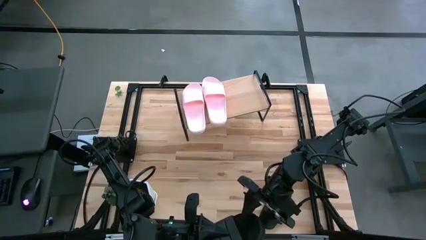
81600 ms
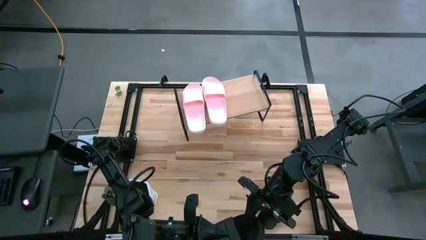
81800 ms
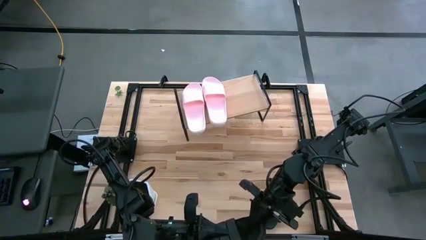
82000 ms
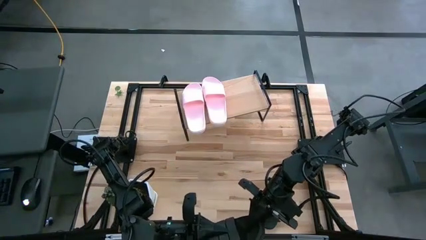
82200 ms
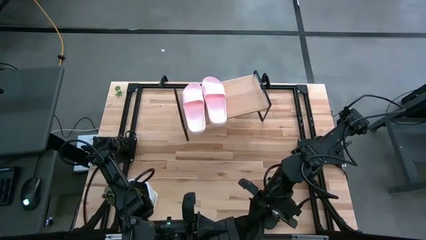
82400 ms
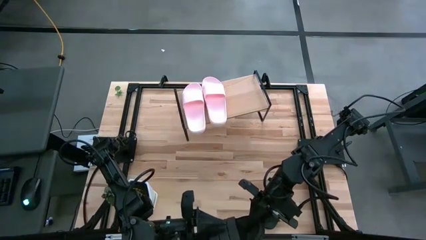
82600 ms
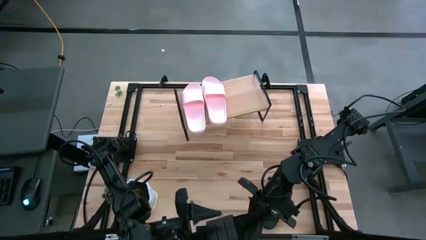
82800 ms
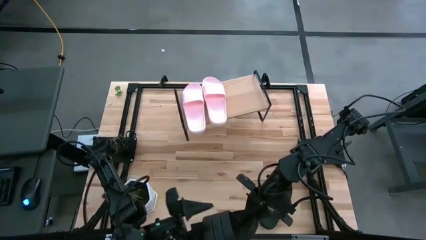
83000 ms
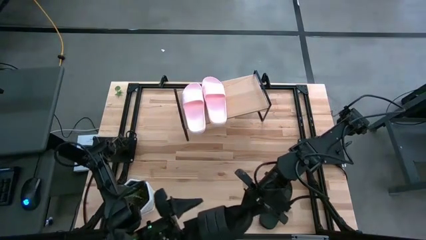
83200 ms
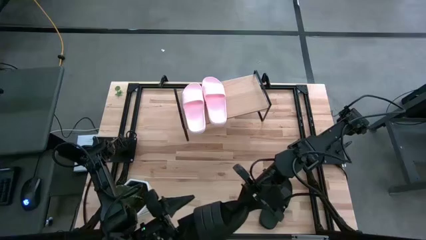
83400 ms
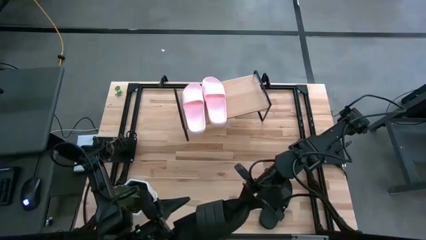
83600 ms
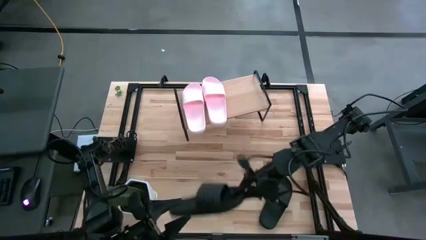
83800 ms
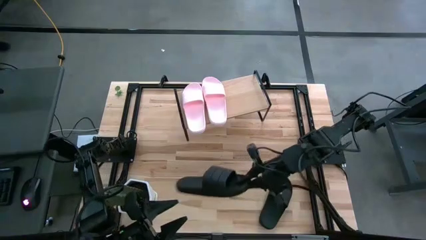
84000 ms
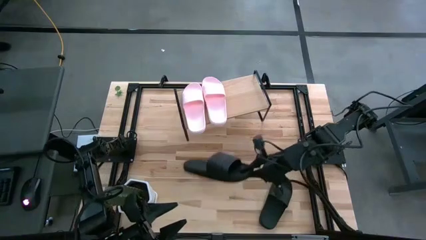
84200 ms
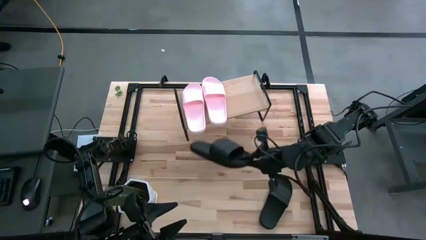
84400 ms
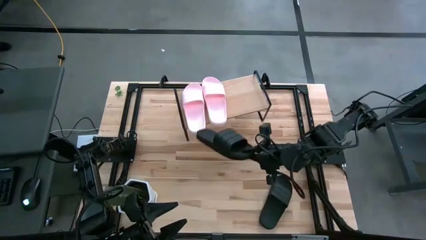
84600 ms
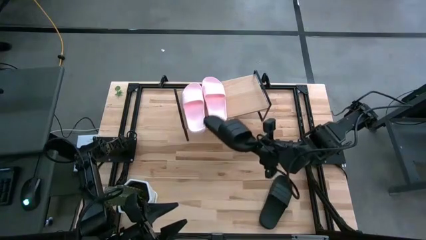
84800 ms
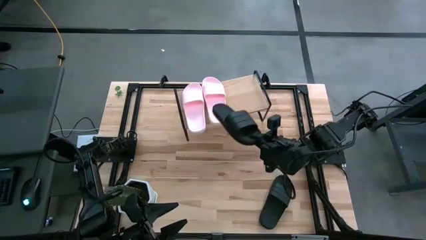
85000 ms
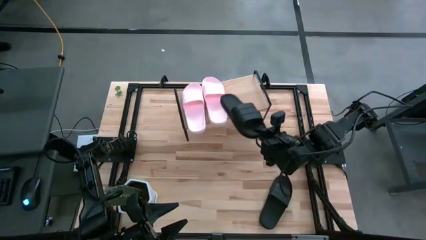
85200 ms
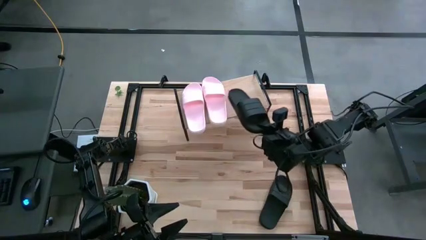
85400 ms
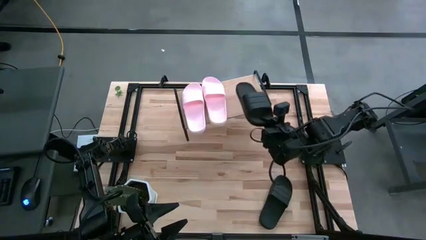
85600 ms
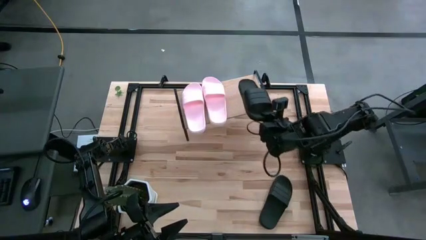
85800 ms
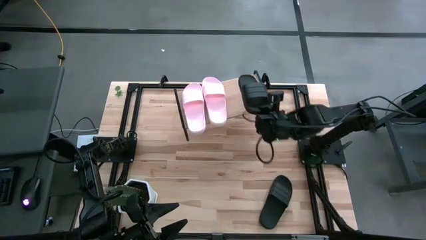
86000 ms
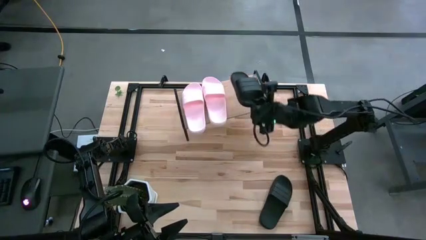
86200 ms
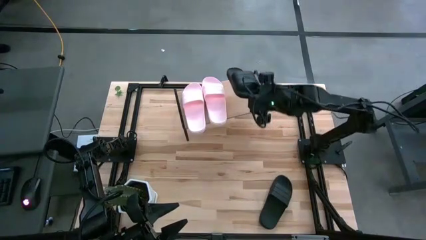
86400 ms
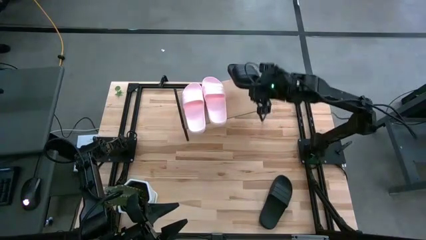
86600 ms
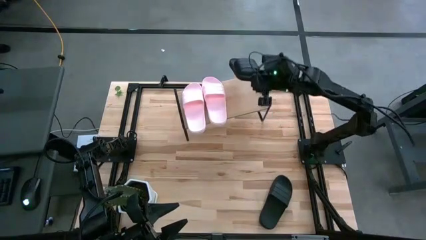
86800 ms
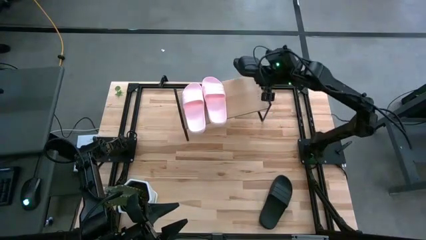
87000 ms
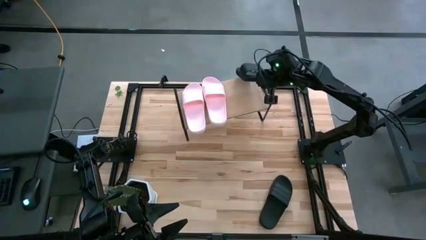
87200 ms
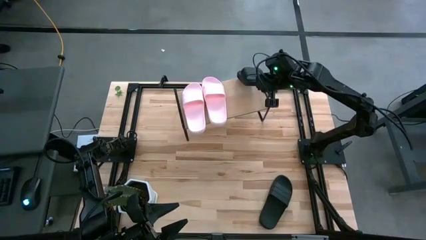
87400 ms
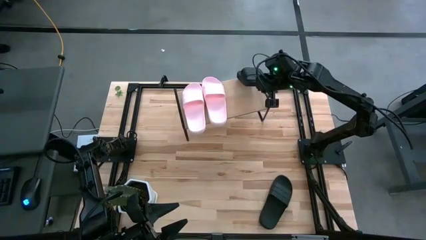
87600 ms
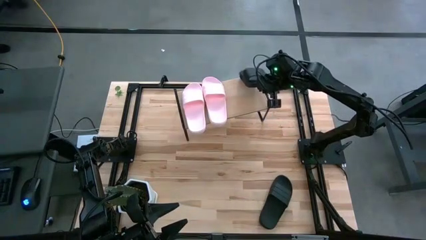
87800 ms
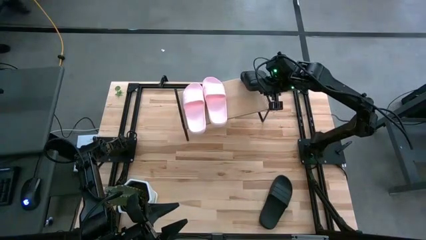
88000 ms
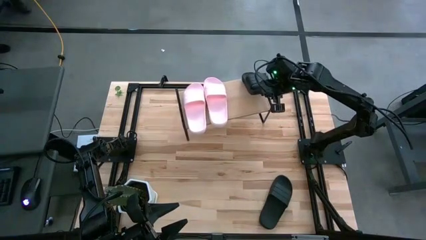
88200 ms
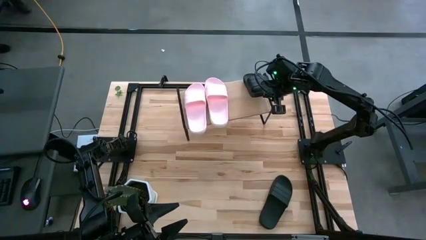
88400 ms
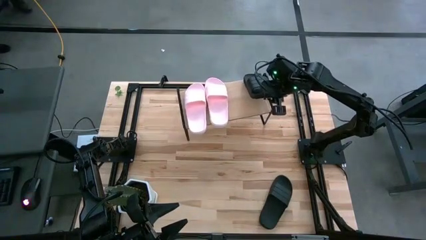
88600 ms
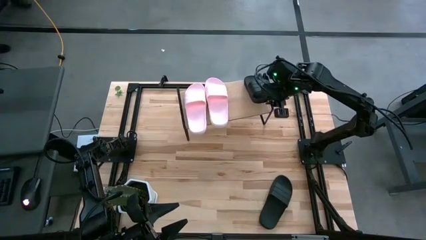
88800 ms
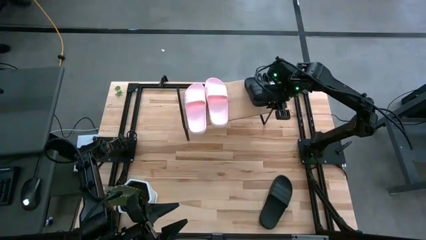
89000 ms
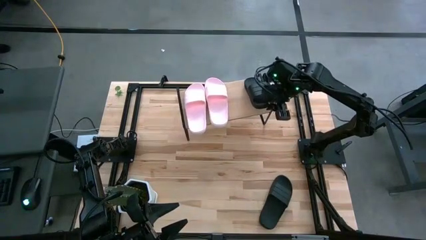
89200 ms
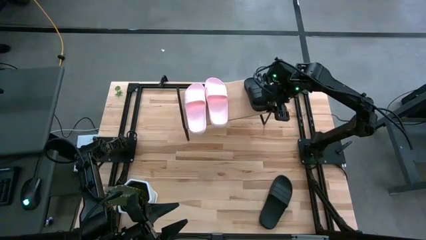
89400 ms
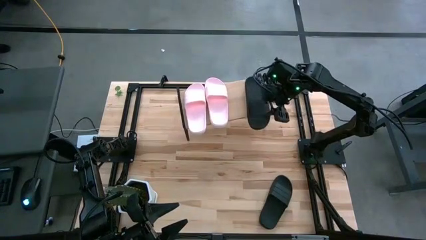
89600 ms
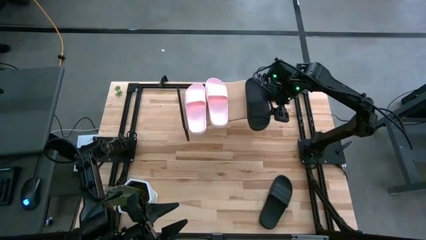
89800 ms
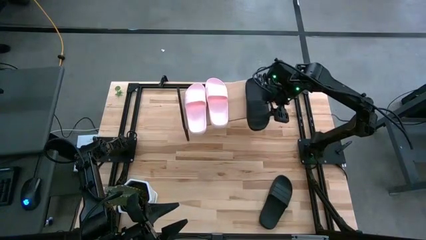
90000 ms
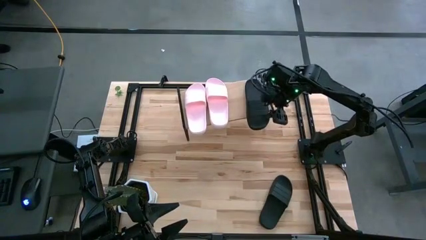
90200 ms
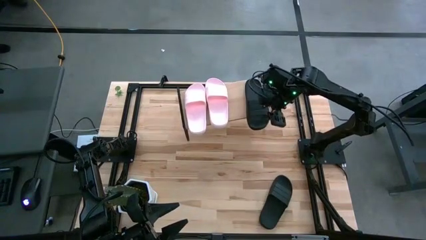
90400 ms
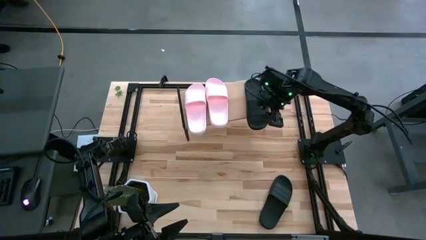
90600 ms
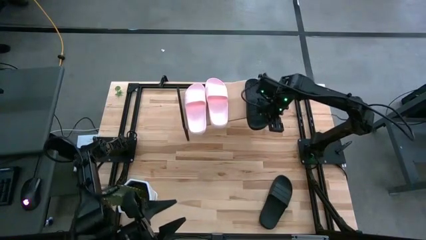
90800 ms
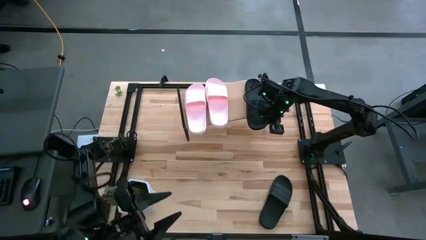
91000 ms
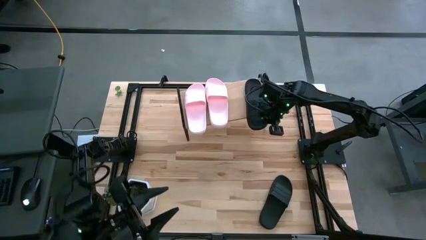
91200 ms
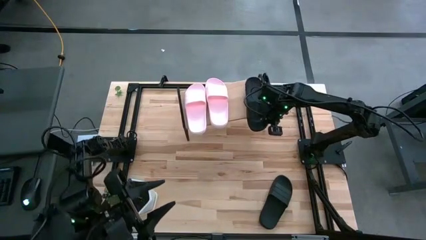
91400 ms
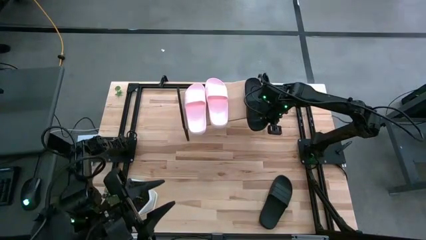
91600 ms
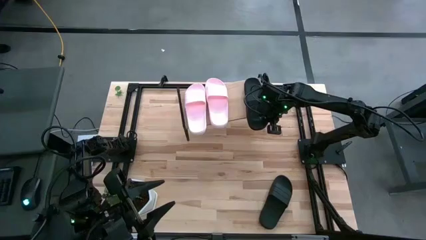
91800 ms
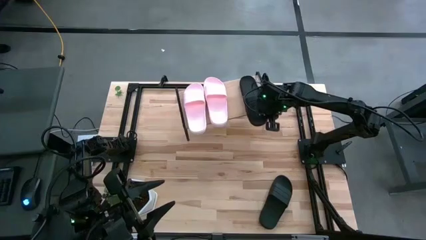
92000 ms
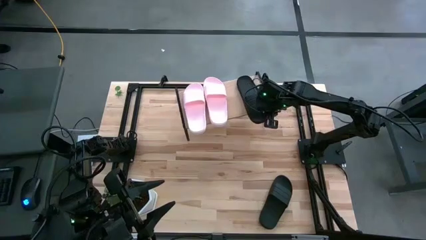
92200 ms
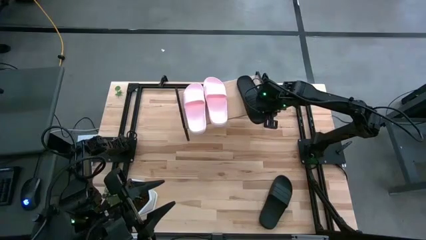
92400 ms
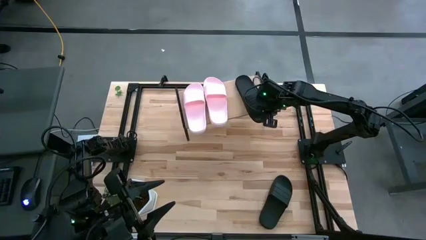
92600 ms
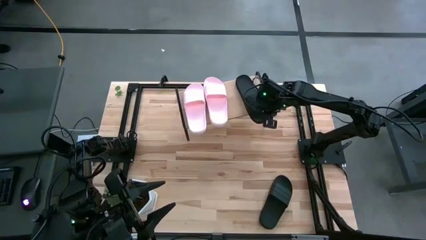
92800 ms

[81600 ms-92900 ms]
Task: Pick and place slides into the shelf
Put the left black slipper on the shelf

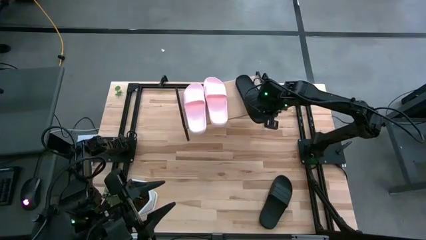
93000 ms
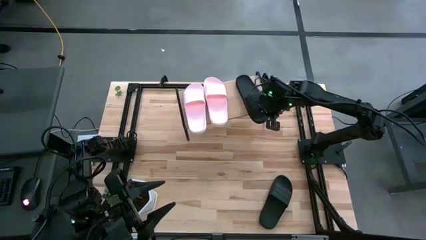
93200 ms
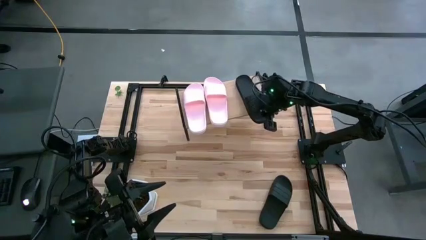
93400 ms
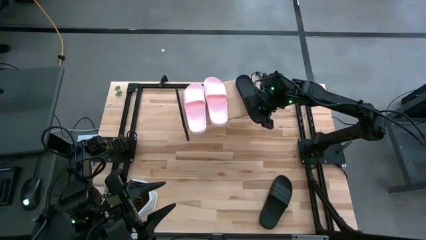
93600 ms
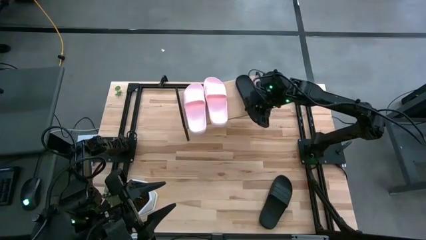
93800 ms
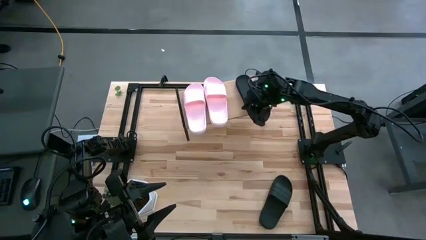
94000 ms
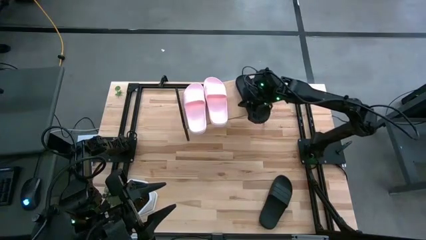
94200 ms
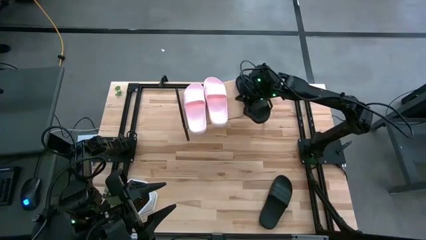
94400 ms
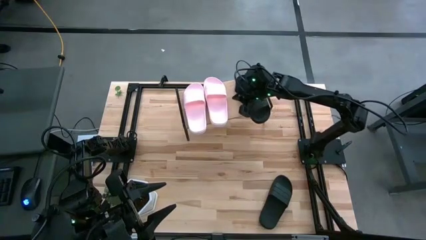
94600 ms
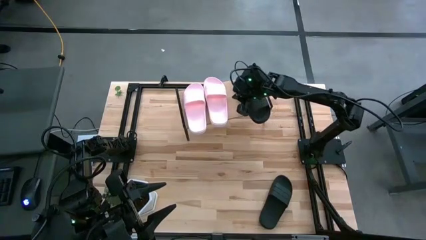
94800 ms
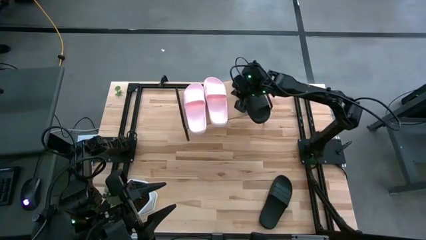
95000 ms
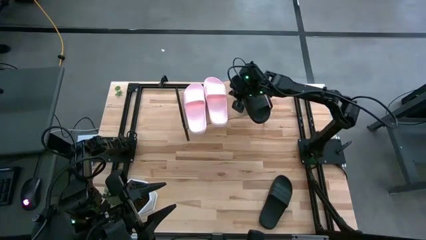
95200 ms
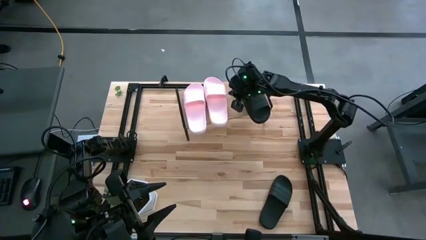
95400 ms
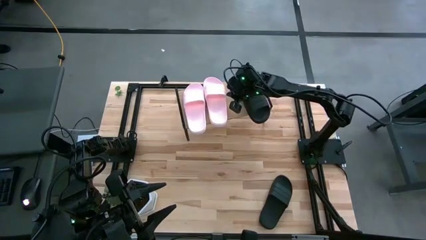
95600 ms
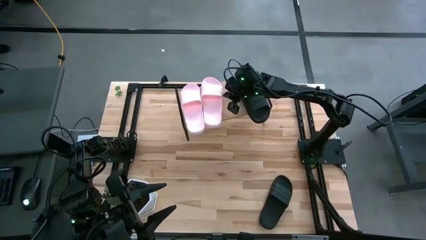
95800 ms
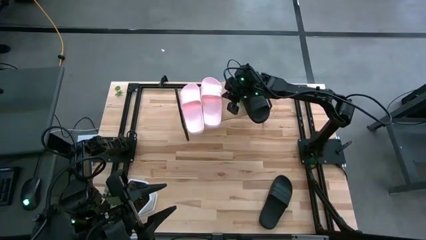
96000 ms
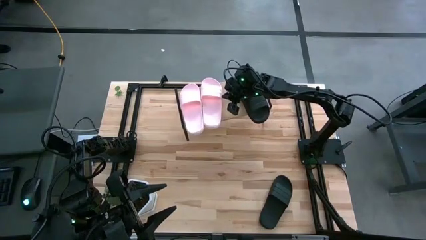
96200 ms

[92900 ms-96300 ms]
Adjust the pink slippers on the shelf

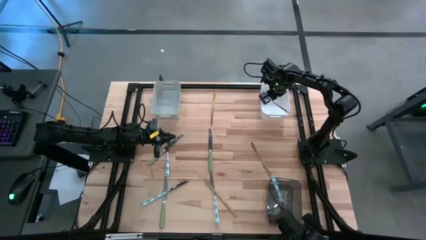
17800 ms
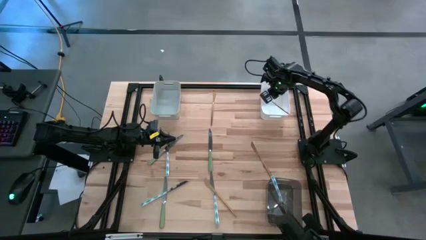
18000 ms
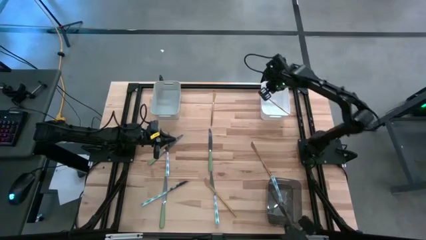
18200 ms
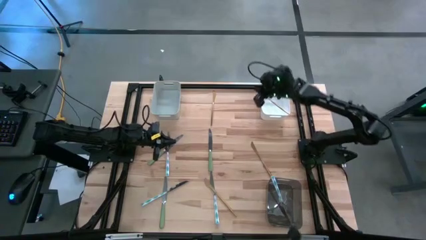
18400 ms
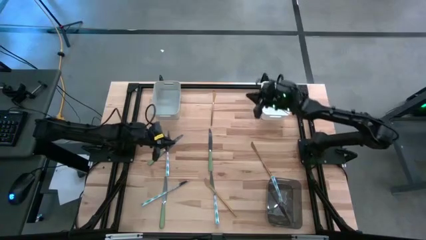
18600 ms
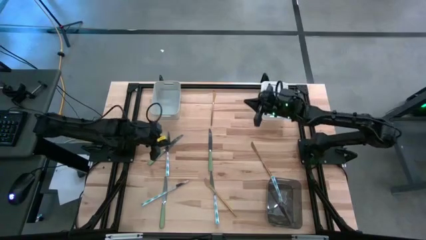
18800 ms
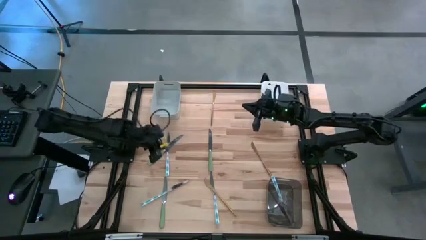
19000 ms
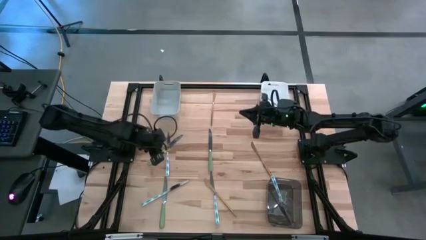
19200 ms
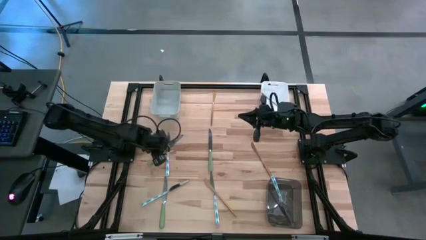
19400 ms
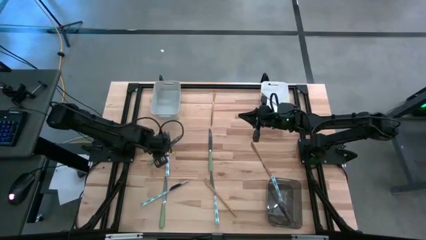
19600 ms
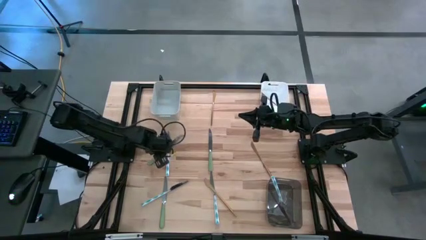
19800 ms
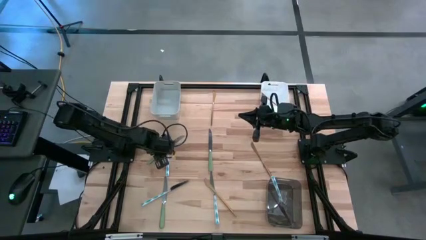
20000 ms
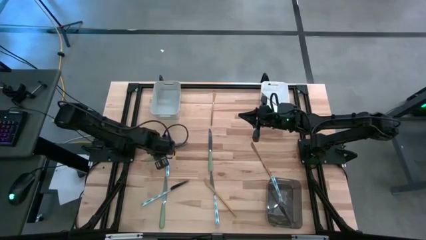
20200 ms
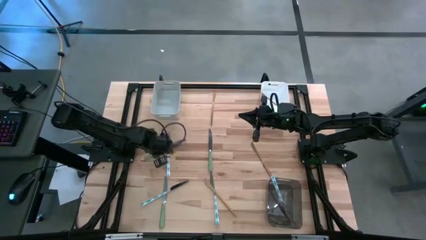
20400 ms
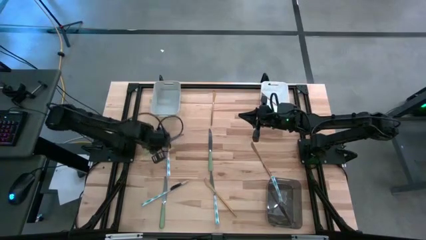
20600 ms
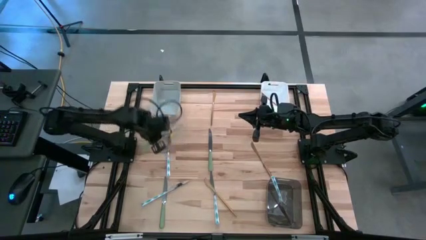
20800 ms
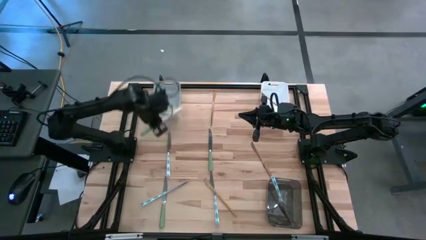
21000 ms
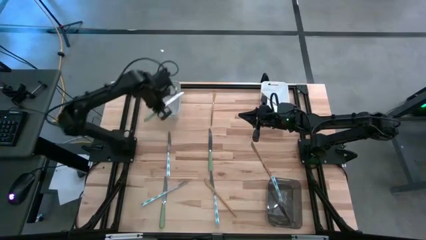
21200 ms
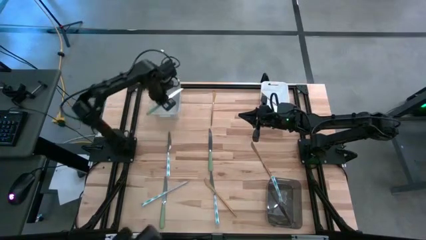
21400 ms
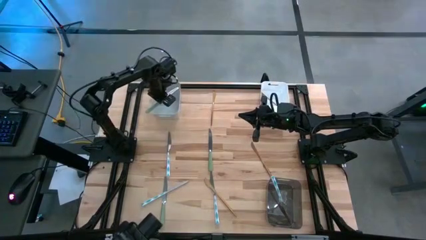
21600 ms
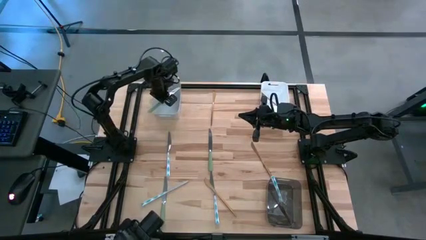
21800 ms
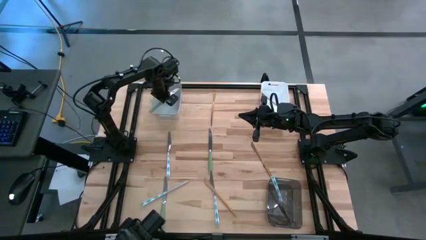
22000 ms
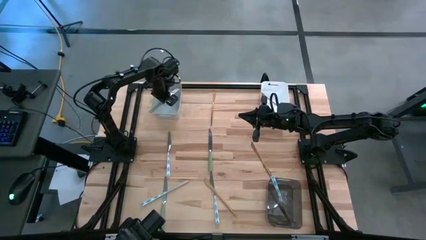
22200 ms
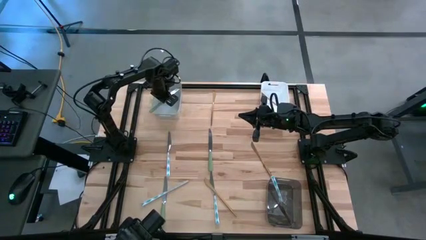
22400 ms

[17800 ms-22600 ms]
Task: Sort silverware by color (type)
Put the top left green knife into the gray bin
